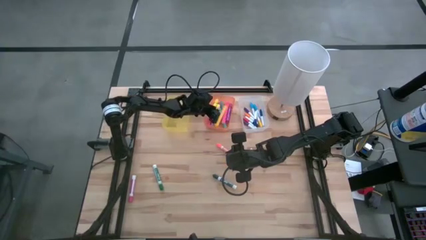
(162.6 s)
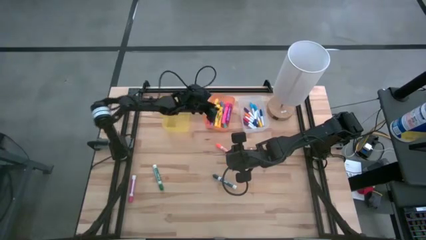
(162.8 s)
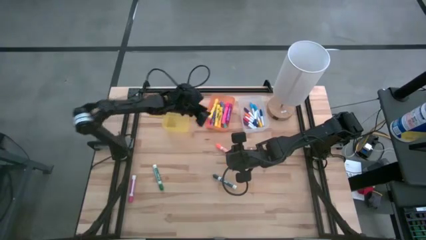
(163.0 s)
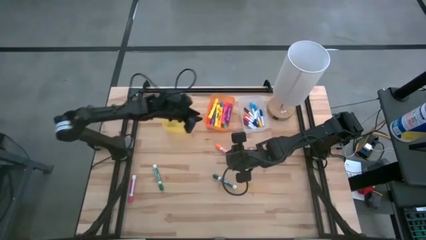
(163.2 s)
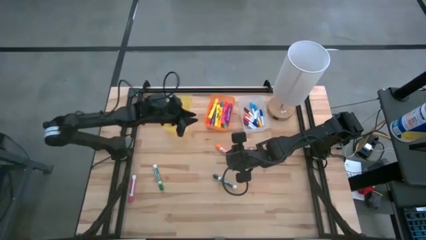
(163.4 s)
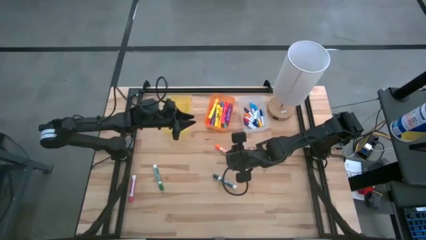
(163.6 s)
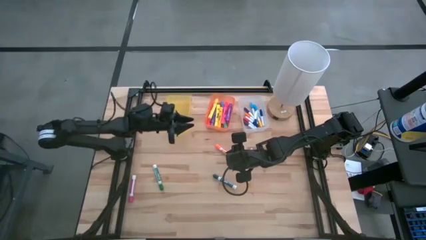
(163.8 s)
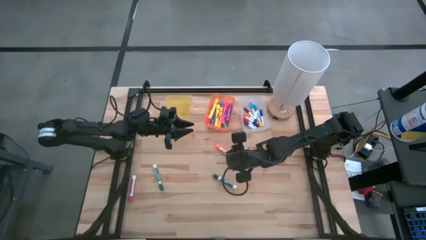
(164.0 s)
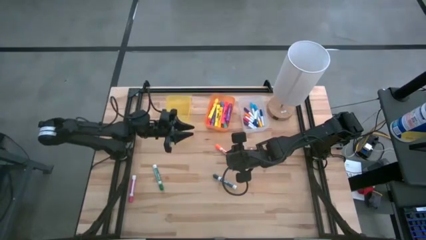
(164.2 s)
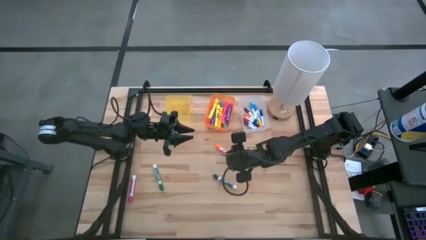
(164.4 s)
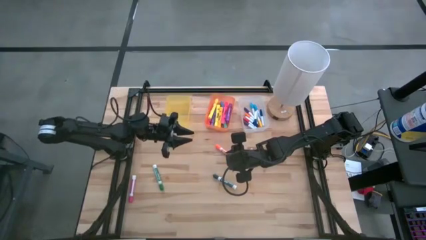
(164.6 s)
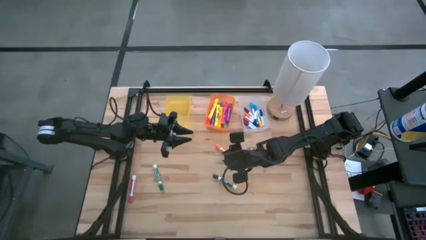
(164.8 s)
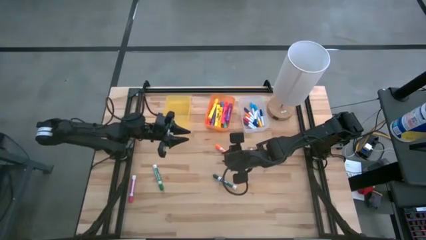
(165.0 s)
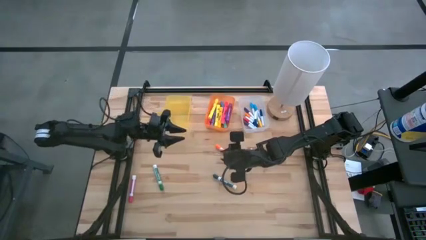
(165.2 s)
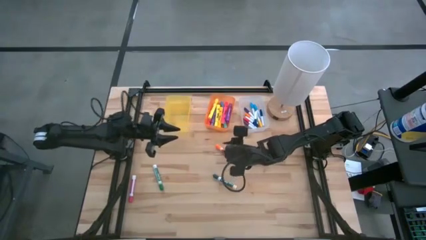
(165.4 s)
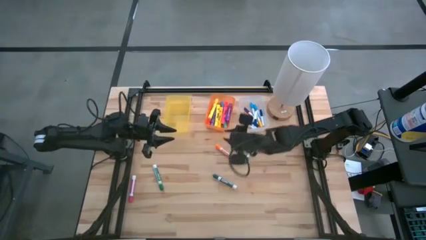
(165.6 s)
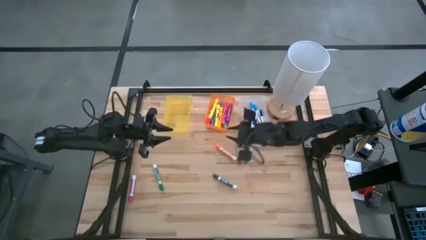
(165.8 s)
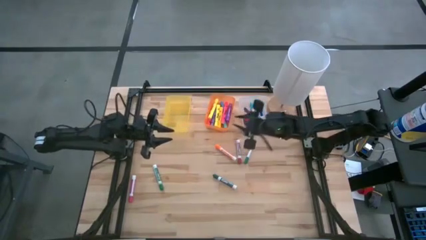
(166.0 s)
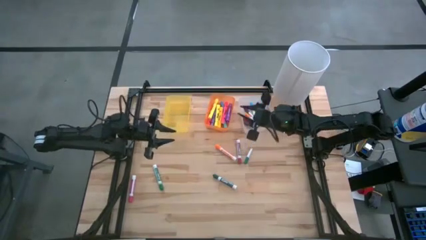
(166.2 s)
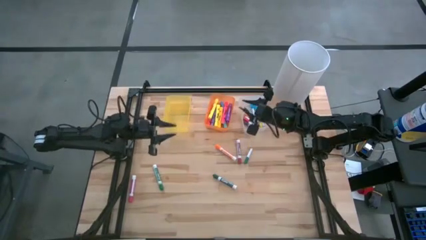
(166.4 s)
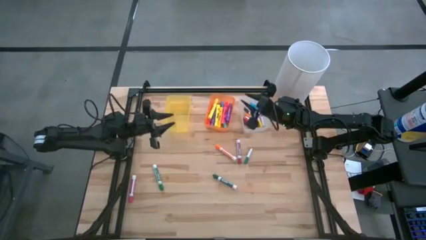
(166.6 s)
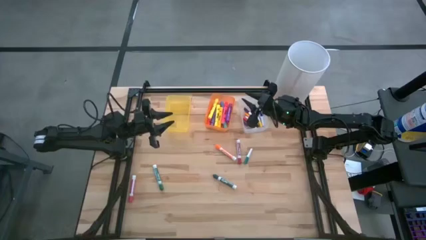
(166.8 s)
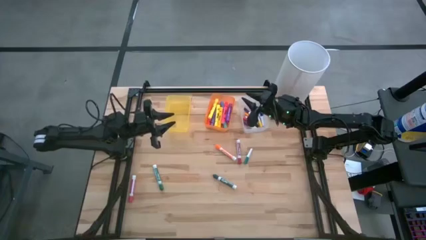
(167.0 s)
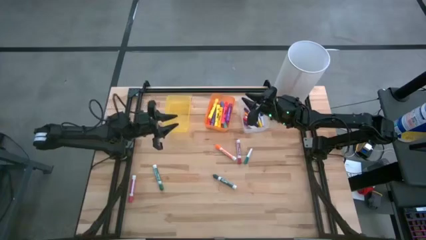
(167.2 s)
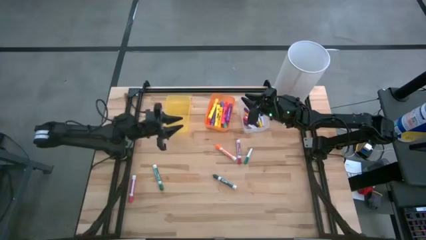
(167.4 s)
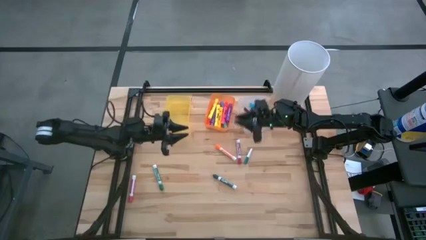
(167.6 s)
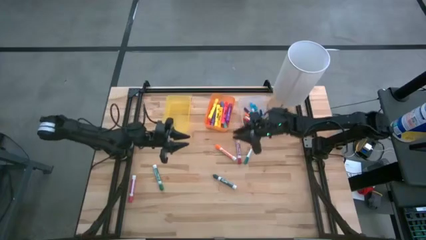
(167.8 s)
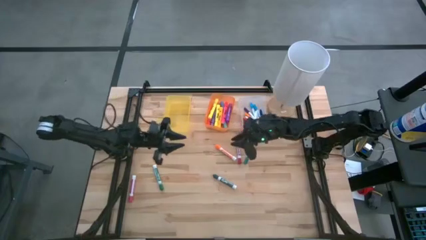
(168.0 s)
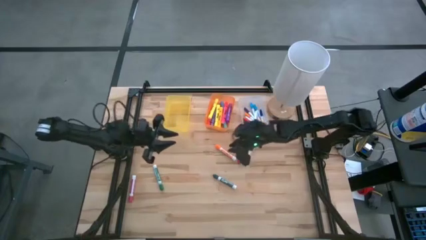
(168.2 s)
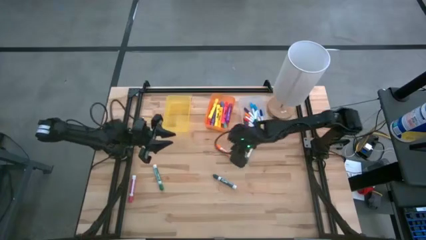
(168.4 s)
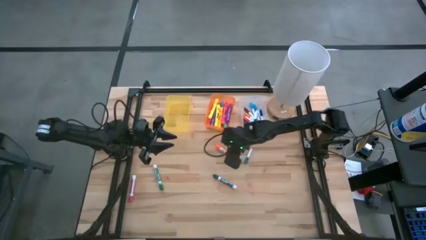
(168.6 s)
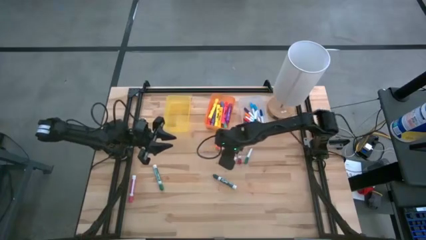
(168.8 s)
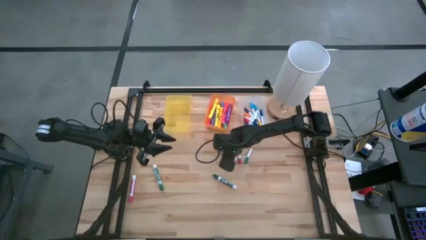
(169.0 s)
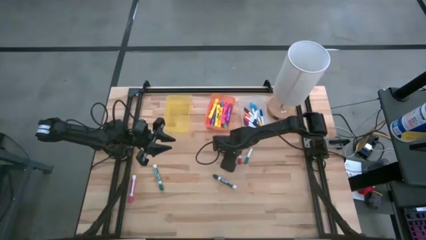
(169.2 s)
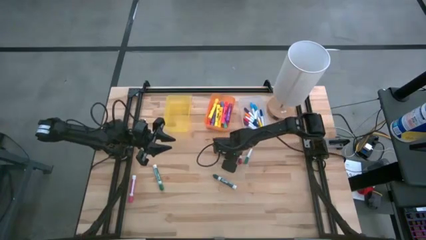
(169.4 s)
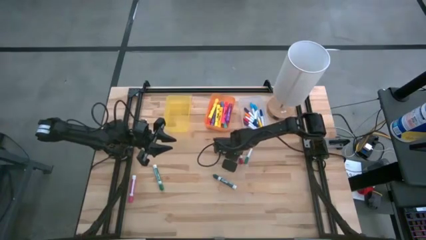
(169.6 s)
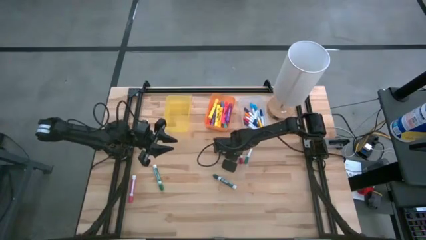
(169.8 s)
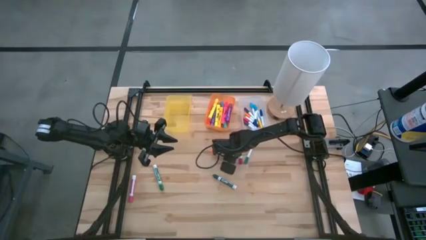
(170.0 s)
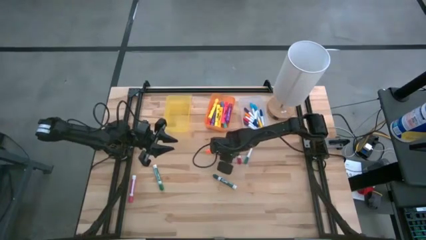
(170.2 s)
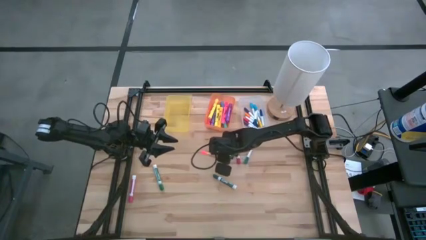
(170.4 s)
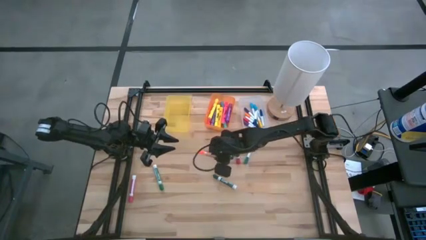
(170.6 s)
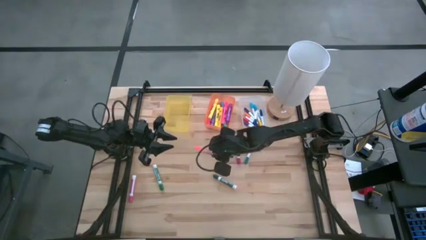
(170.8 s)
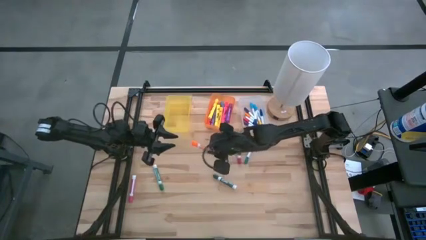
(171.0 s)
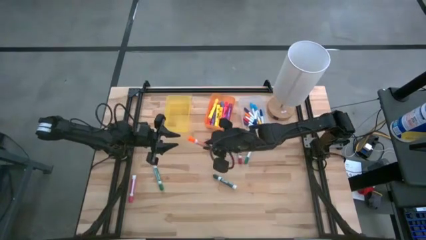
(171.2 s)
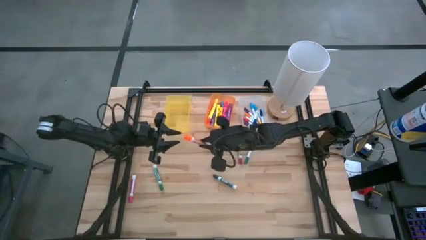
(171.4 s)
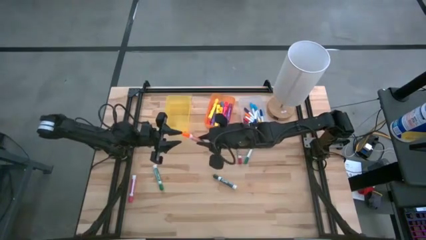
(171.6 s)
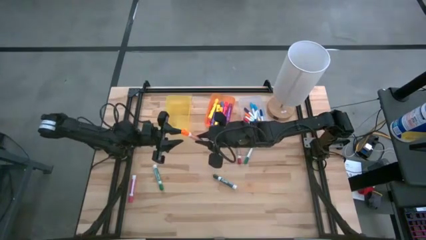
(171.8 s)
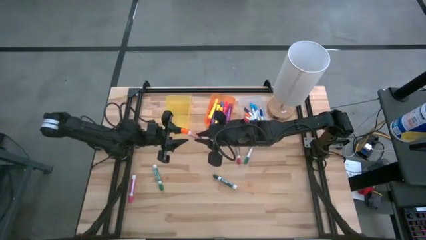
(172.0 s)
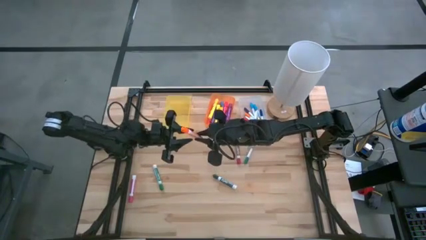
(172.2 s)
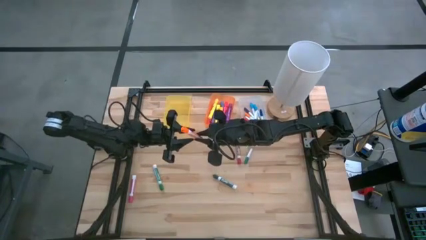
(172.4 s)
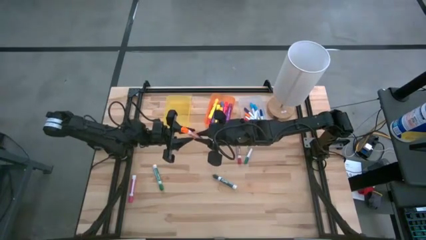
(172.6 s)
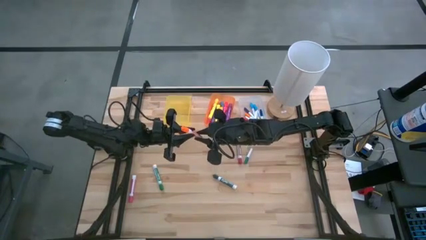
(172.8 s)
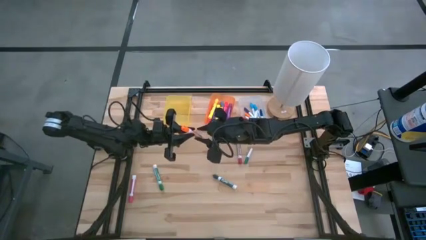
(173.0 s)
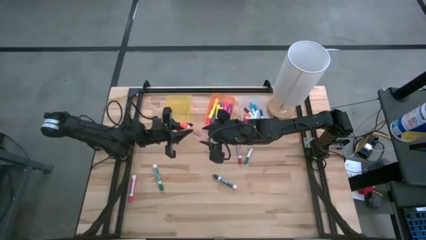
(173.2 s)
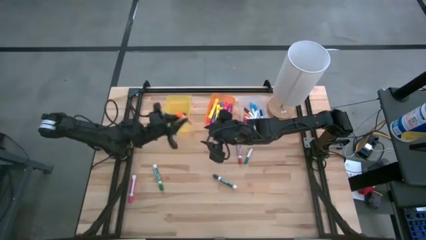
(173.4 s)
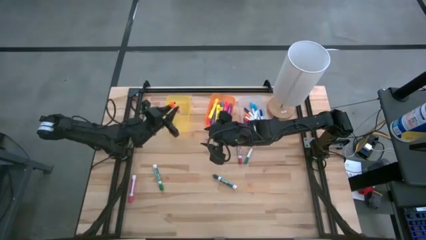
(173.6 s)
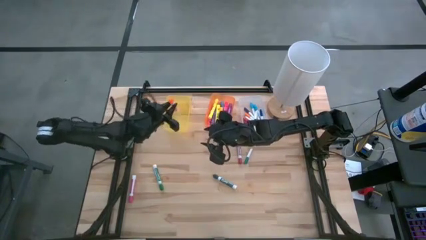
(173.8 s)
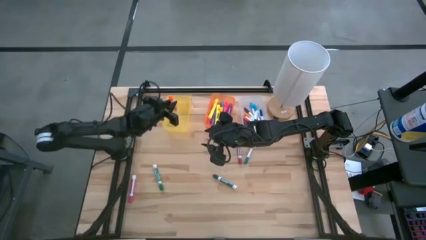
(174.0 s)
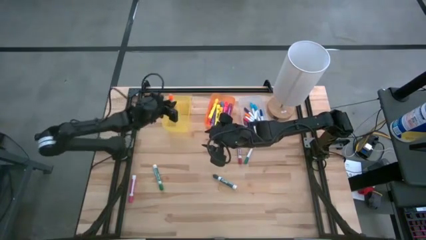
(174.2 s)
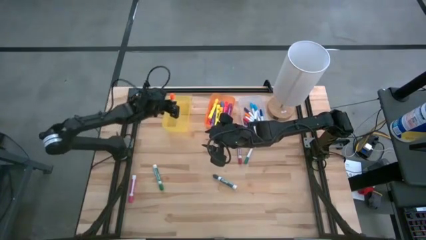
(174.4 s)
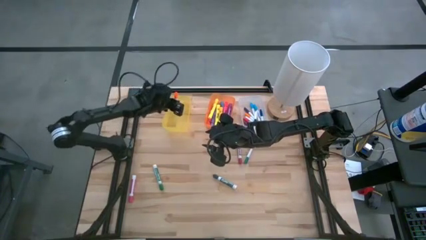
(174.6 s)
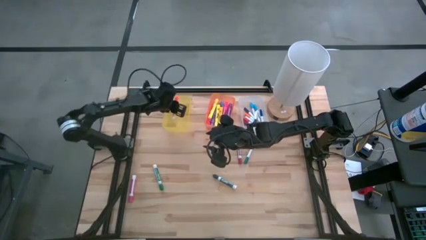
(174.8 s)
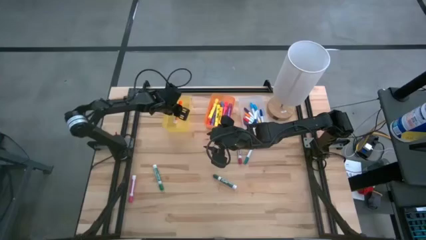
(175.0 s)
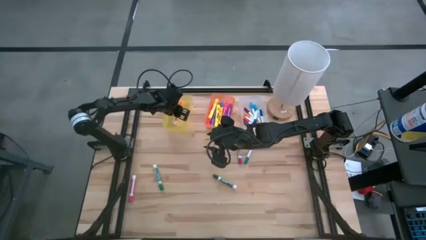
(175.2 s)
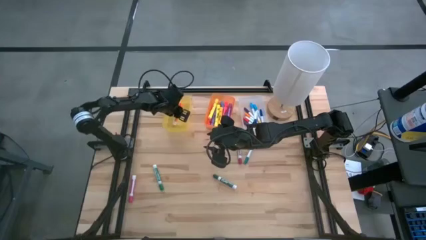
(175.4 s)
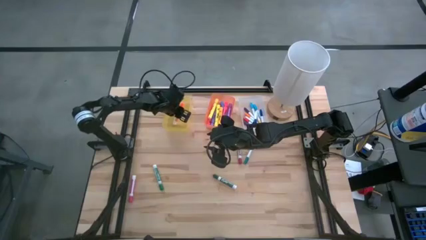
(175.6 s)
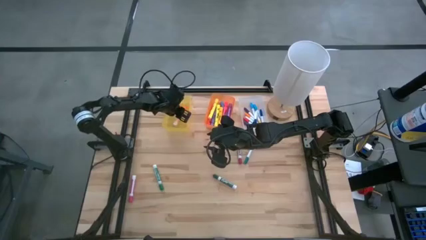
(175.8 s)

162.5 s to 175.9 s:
Task: Pick & Place Markers
Put the orange expo dry erase marker into the yellow bin

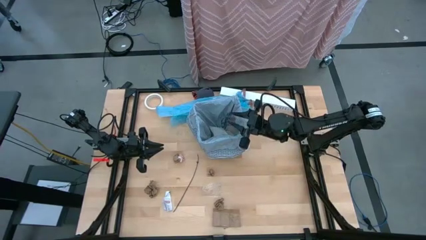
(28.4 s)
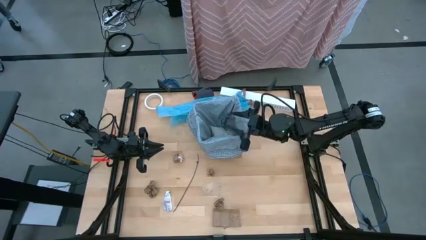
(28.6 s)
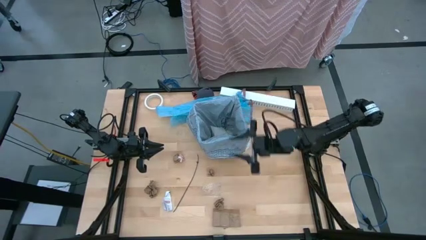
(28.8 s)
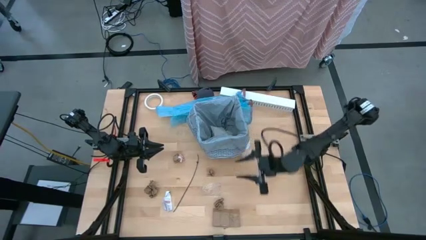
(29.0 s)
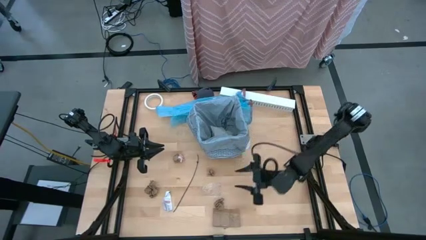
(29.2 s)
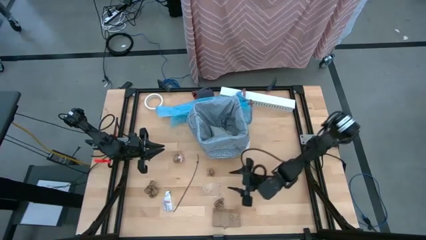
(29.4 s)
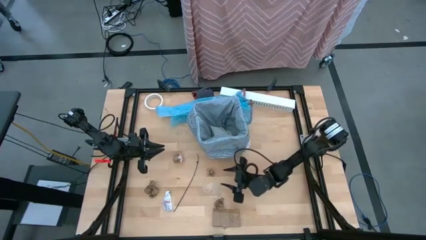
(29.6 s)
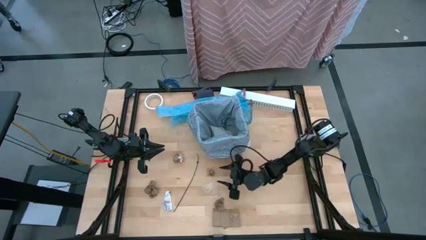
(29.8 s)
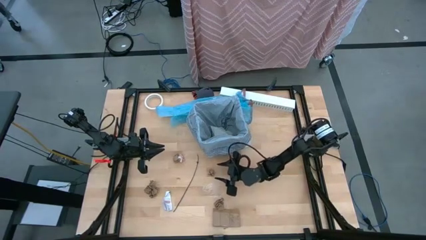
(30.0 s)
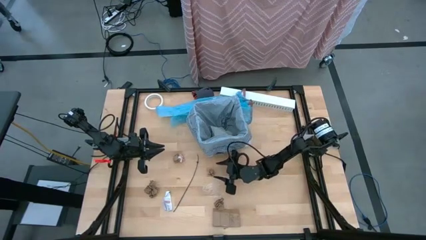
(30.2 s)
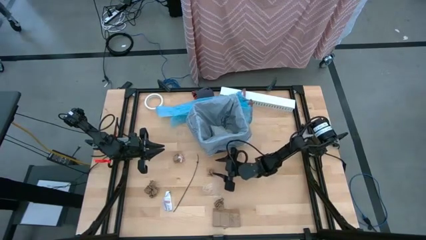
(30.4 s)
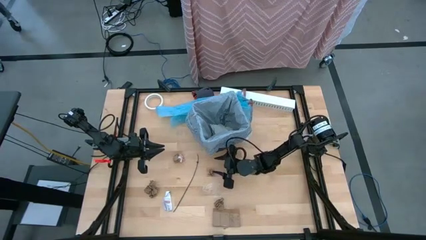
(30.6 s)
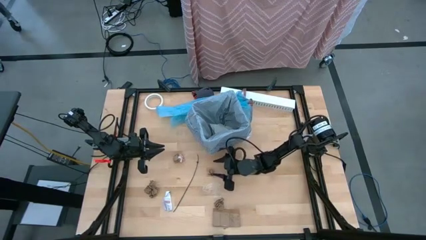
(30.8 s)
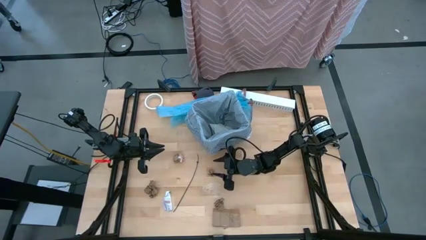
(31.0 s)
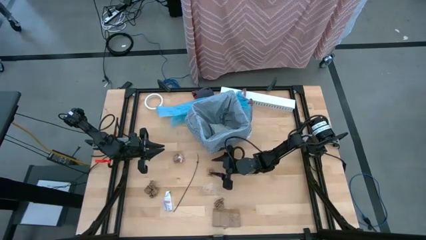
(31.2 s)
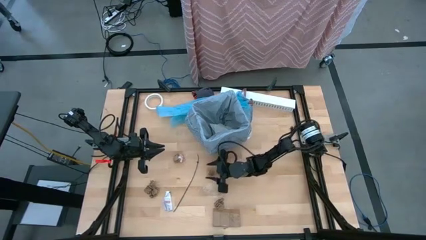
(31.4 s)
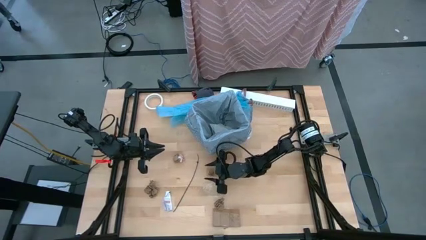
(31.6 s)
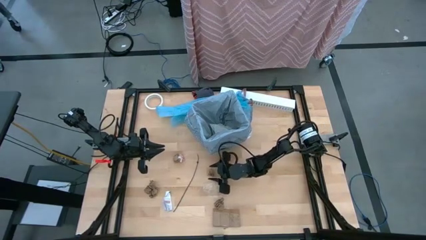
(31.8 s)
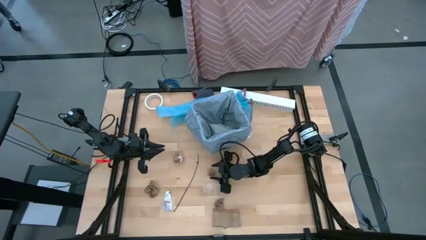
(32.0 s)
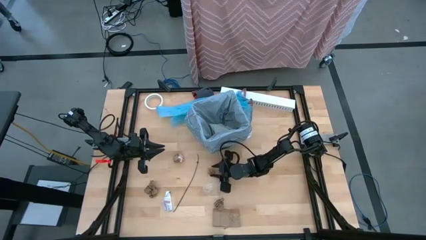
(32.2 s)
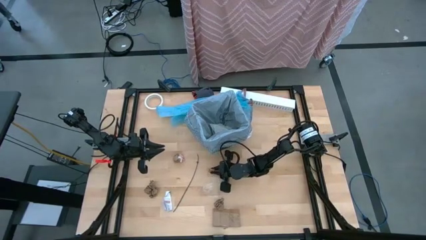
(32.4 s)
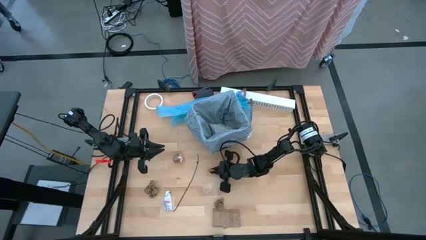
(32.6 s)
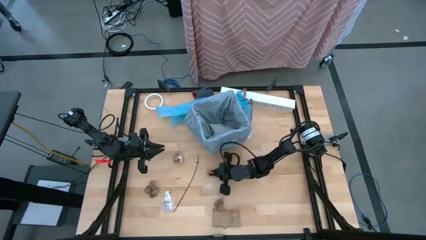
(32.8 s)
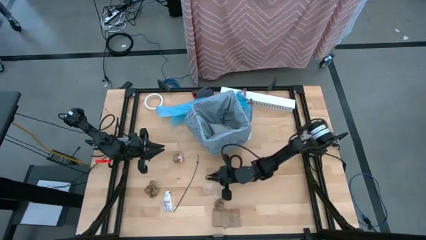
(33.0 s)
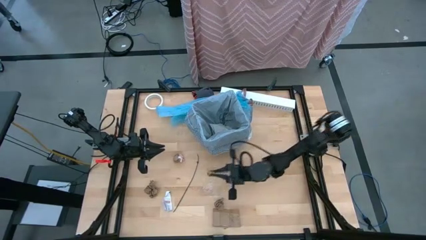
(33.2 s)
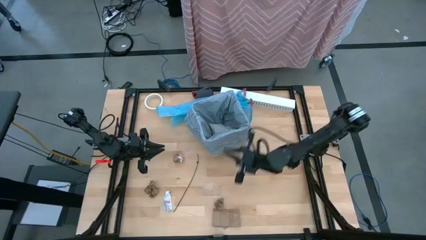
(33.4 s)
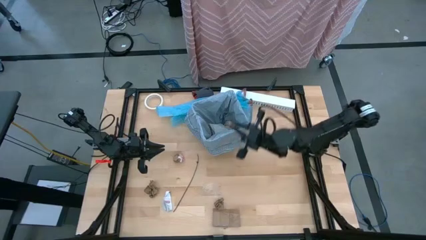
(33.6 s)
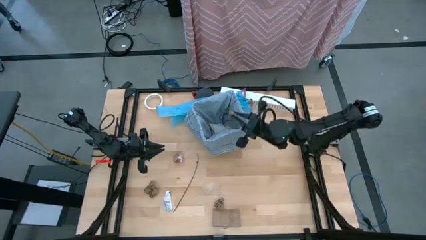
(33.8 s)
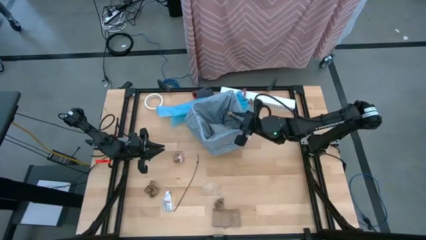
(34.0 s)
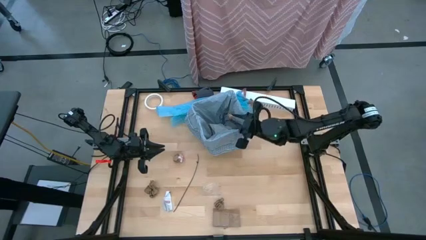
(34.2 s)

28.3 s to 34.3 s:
Task: place trash/remove bag and relplace
Put the brown napkin inside the black trash bin
